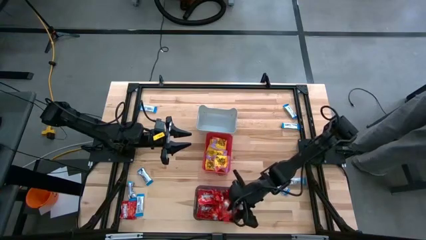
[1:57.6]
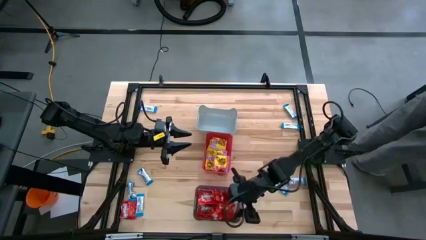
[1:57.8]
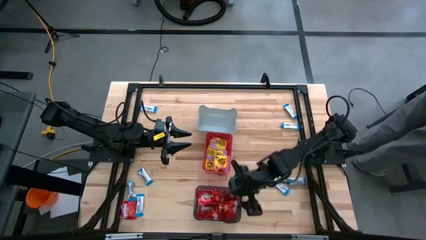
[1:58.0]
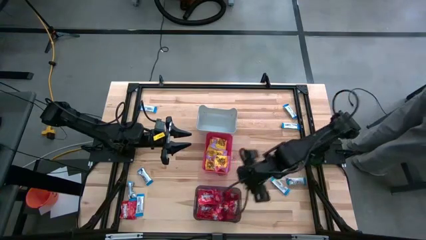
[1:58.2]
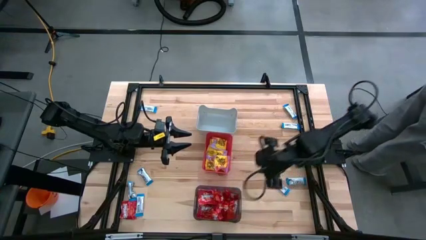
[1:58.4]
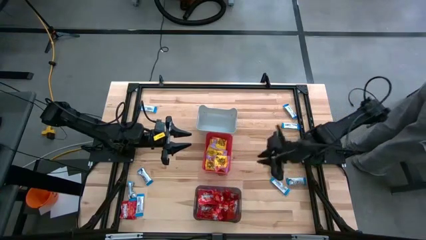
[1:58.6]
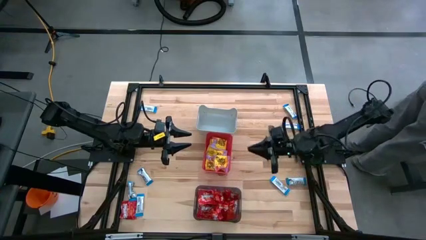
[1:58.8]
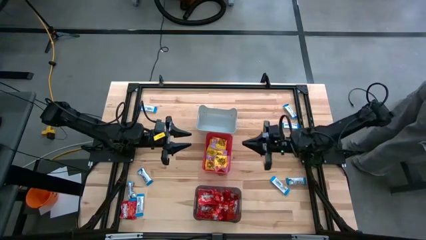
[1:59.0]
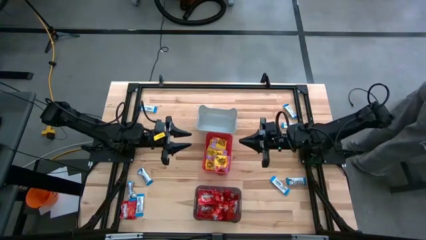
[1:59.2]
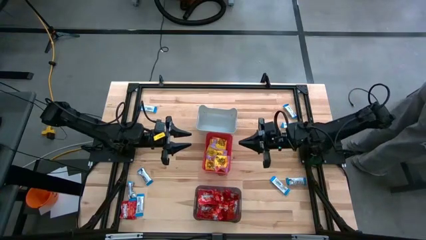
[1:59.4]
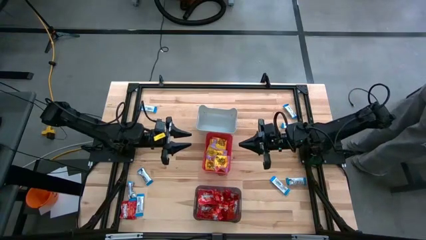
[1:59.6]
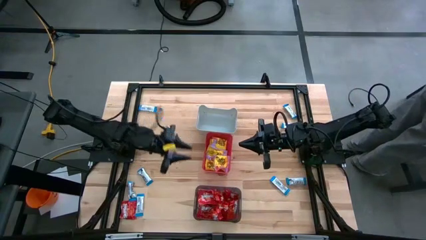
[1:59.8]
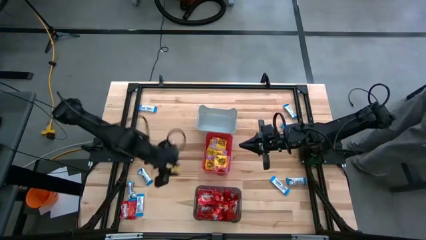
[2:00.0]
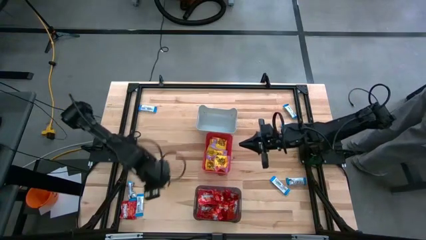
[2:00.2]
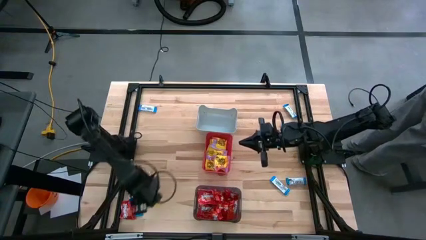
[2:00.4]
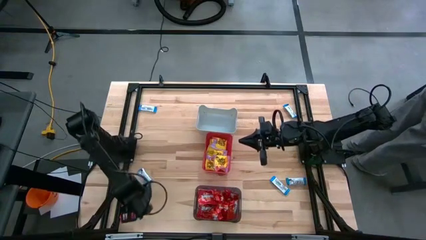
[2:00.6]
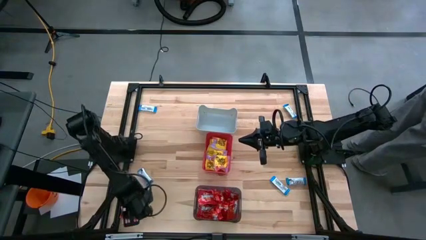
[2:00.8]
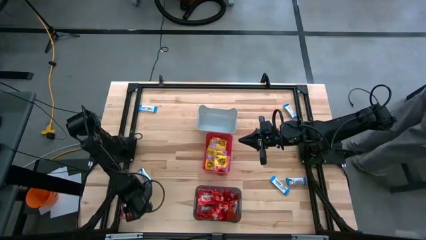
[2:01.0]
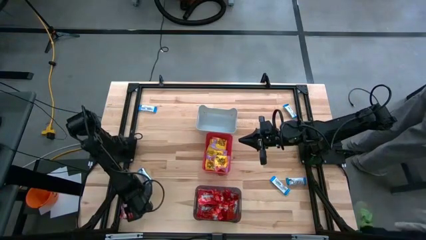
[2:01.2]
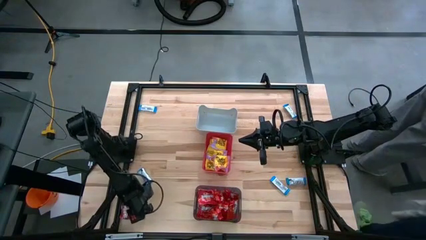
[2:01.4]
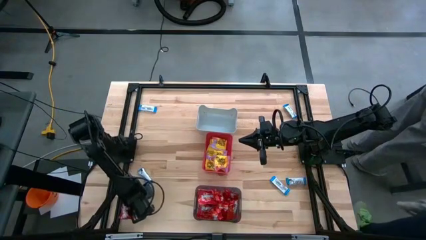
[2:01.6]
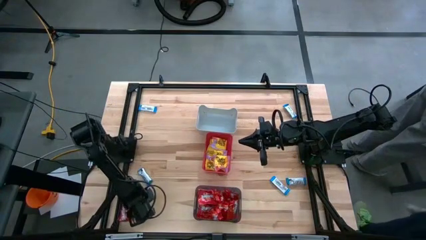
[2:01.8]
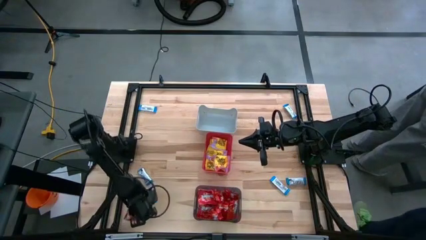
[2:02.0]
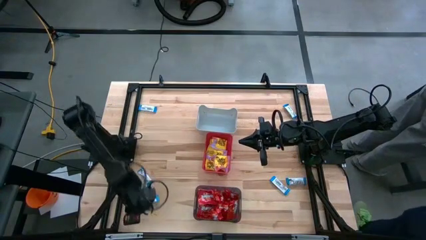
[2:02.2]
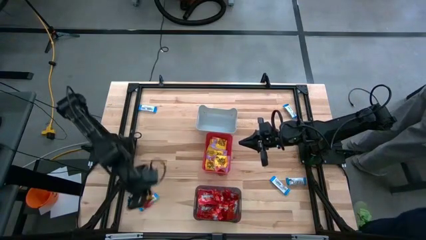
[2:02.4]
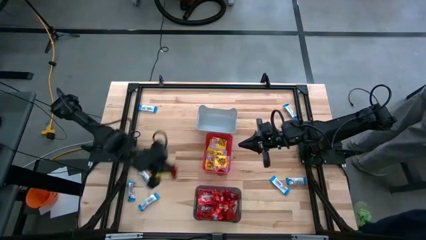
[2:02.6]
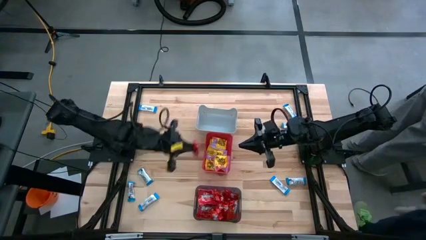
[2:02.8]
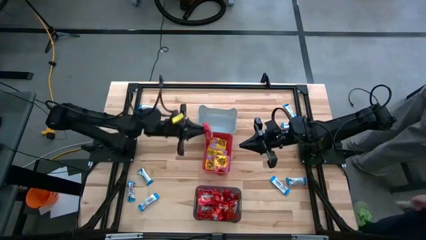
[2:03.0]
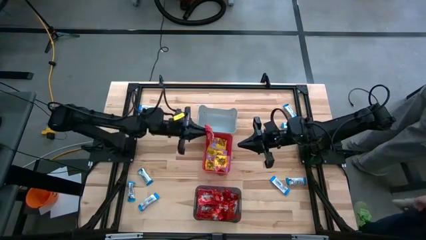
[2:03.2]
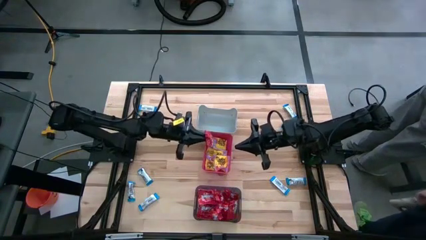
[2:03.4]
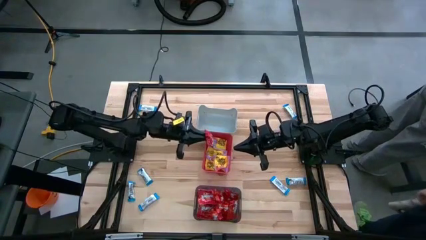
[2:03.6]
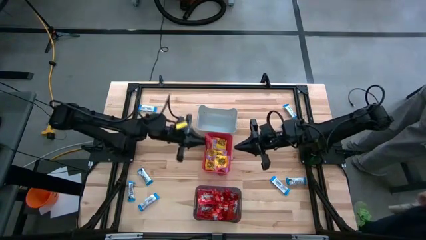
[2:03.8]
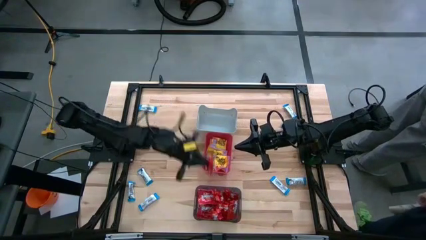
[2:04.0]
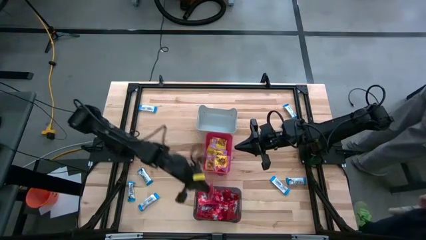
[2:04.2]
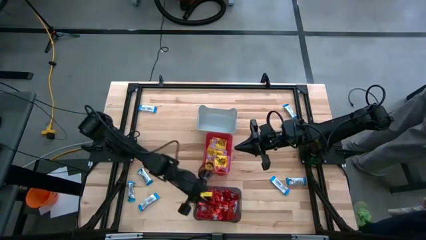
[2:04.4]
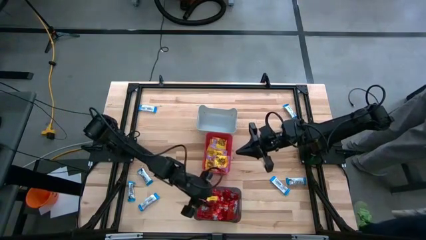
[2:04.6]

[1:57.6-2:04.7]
Task: Sort candy
Put the red candy into the black bin

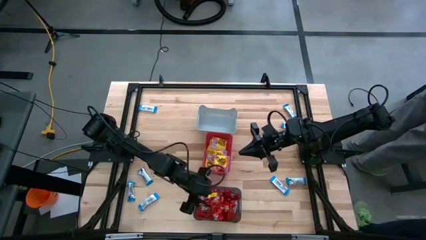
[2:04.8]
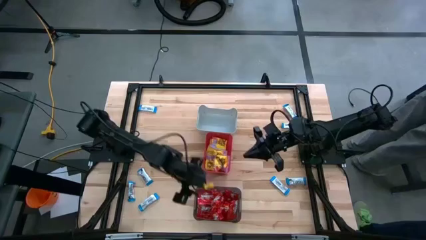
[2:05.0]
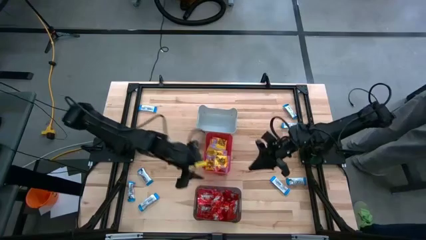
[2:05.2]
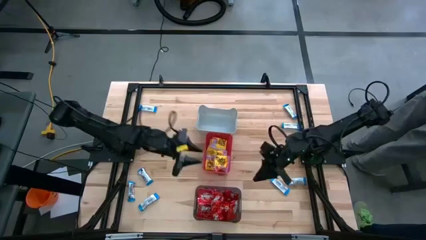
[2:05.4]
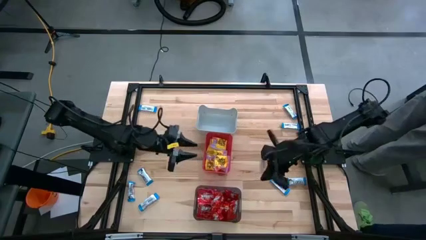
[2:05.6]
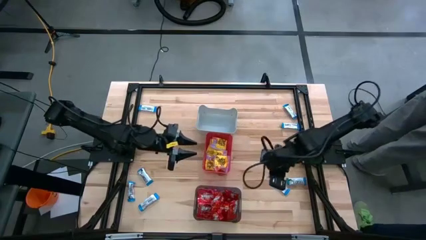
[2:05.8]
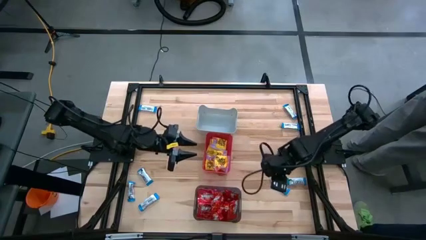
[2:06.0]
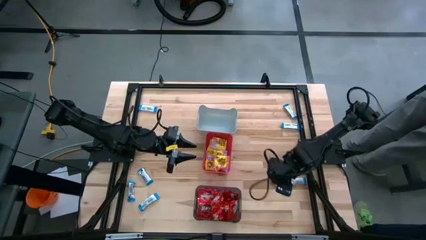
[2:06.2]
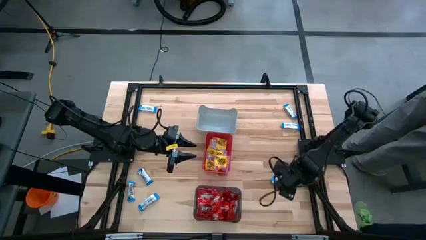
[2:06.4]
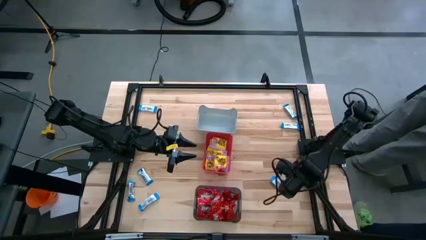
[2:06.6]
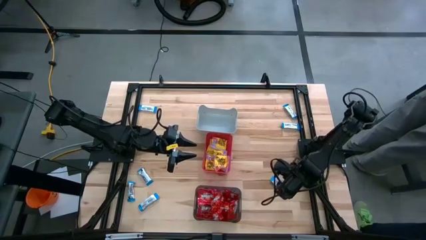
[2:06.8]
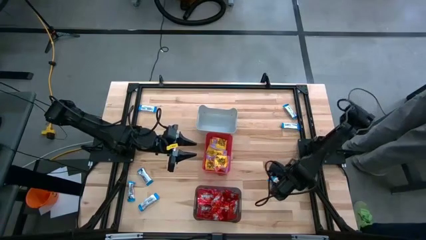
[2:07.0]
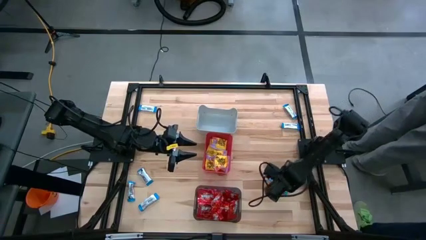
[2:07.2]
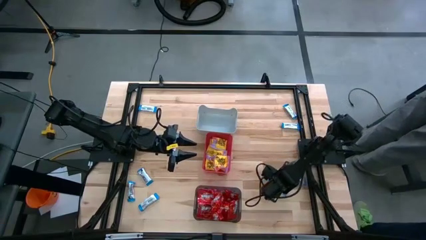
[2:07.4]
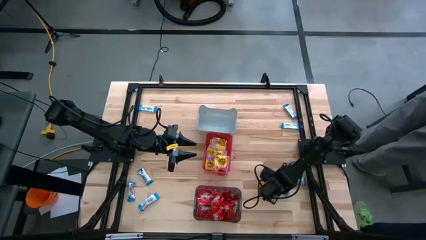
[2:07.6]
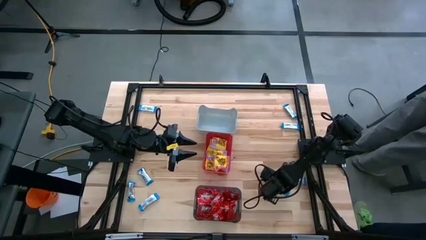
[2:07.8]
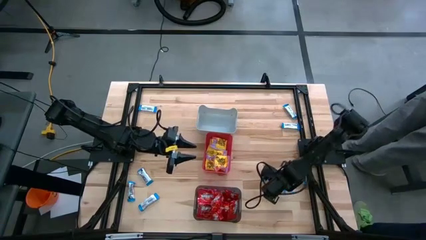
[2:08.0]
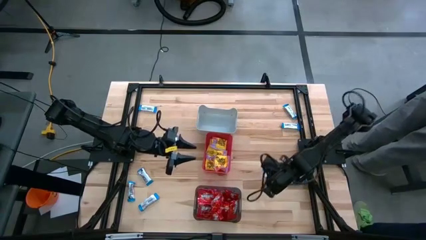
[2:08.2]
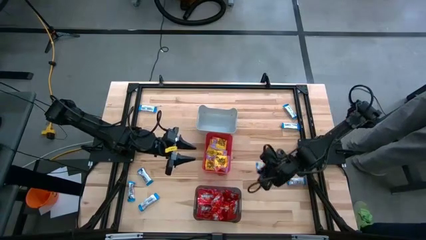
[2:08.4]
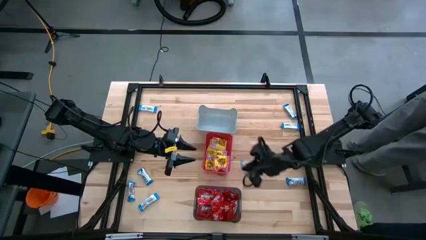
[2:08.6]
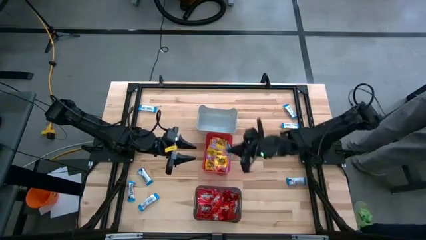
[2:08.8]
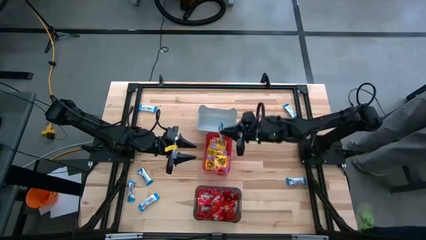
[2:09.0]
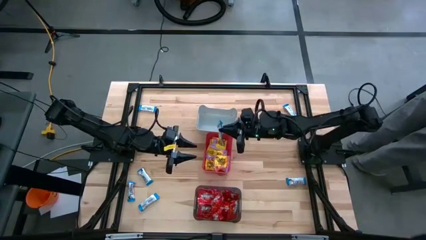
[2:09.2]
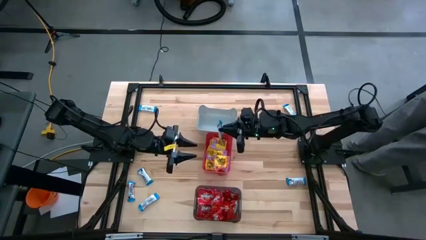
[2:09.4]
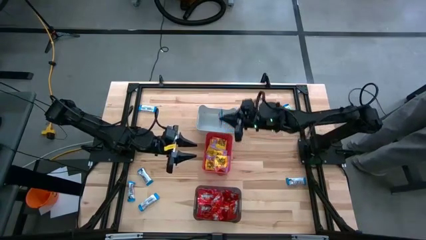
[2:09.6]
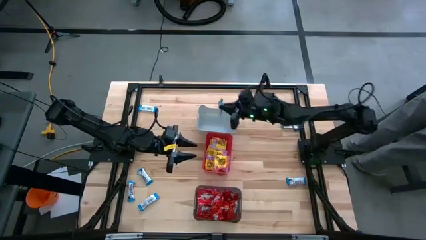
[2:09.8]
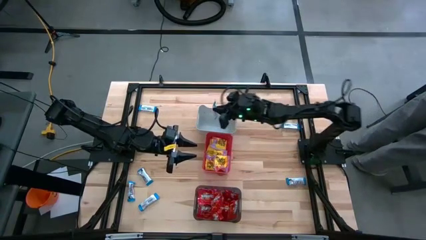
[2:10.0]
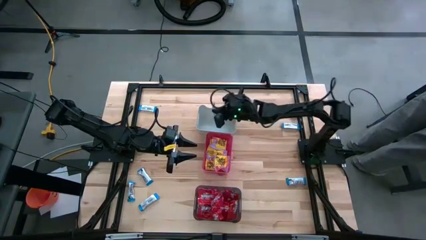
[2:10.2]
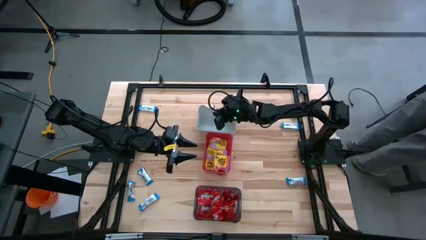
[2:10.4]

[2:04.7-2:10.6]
Put the white candy into the white bin

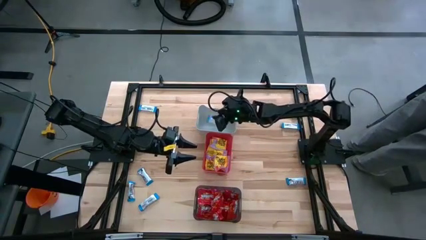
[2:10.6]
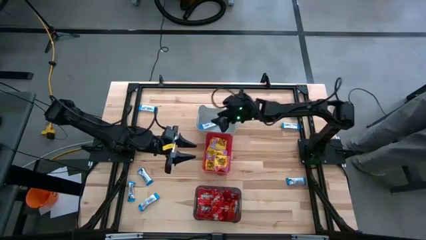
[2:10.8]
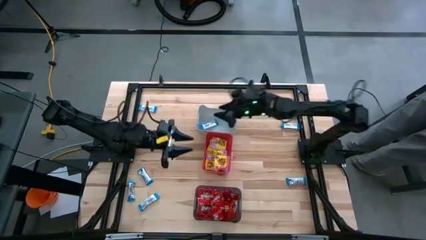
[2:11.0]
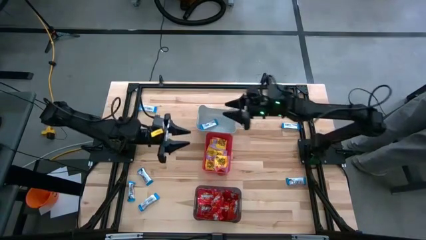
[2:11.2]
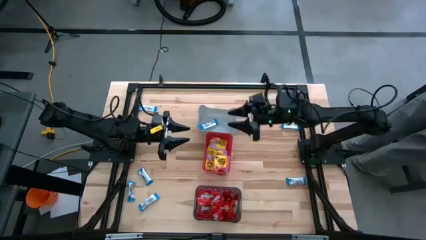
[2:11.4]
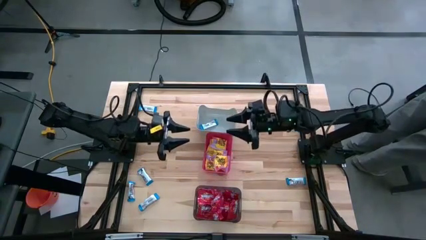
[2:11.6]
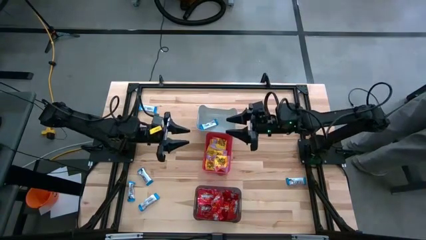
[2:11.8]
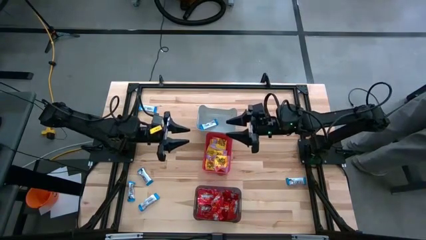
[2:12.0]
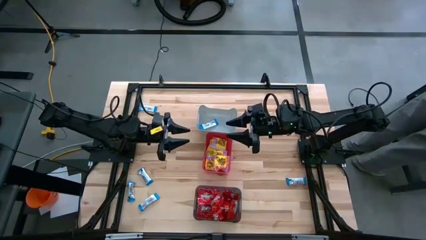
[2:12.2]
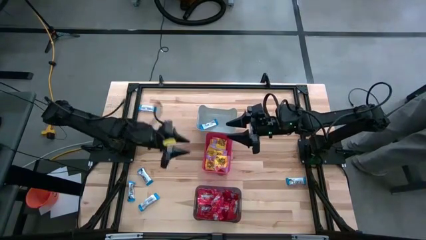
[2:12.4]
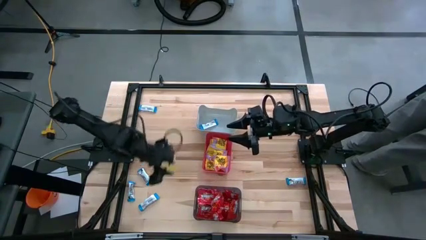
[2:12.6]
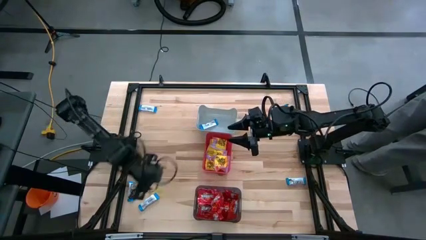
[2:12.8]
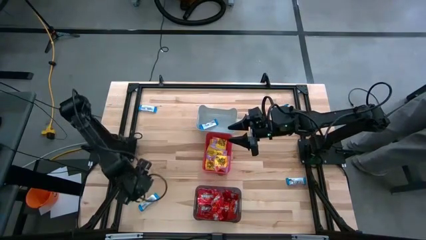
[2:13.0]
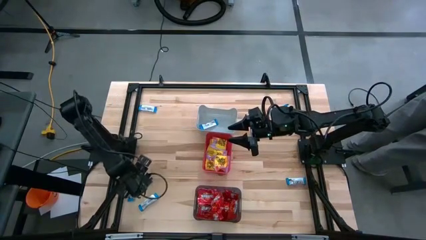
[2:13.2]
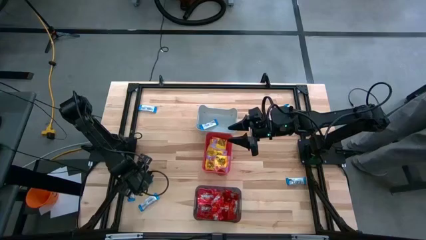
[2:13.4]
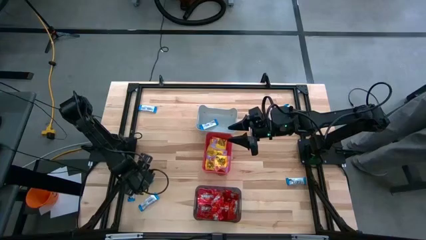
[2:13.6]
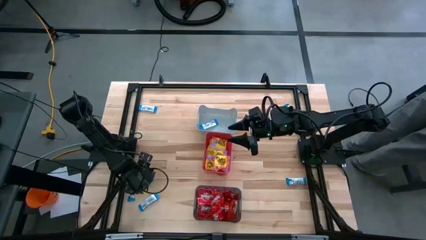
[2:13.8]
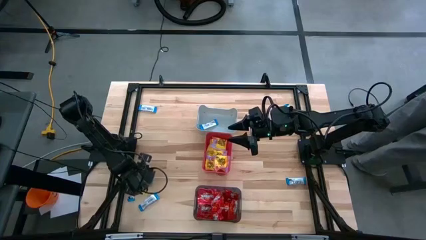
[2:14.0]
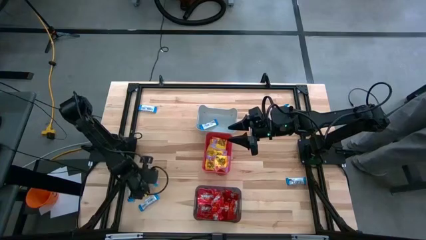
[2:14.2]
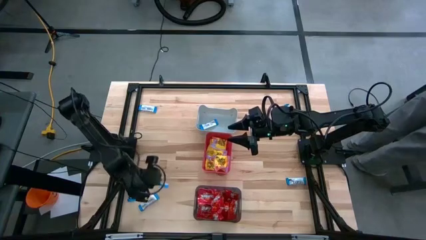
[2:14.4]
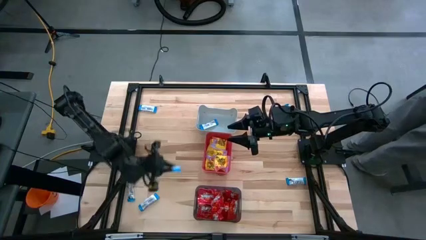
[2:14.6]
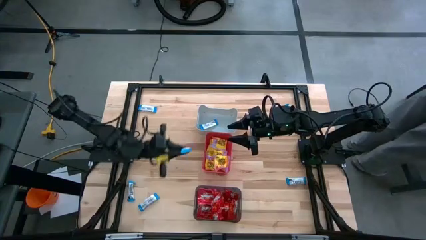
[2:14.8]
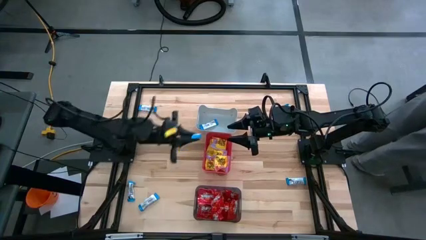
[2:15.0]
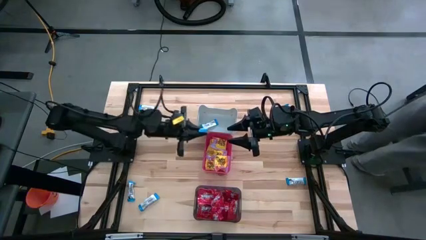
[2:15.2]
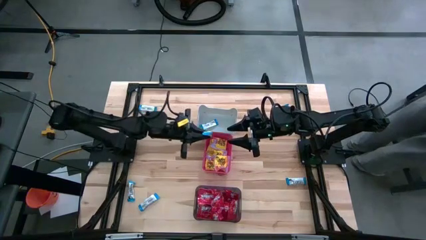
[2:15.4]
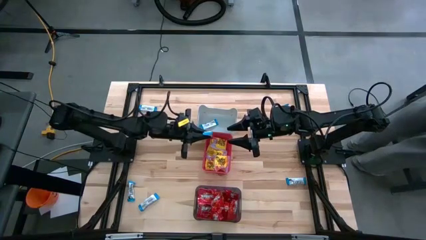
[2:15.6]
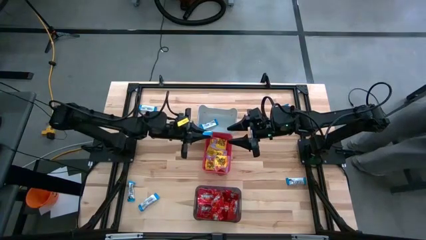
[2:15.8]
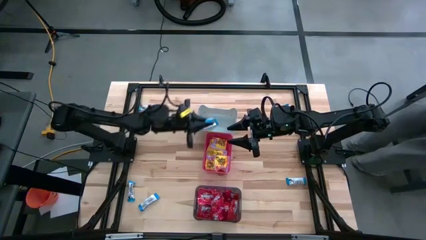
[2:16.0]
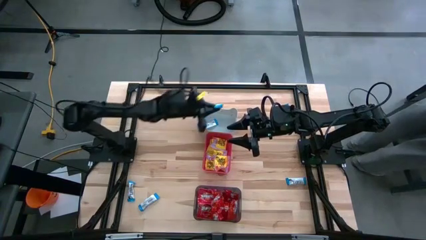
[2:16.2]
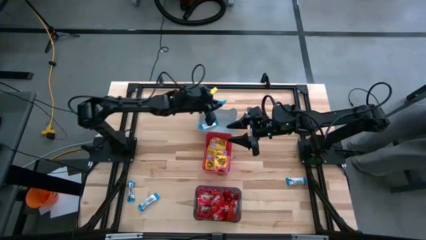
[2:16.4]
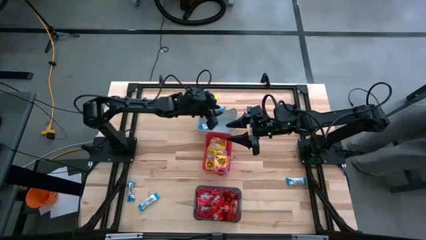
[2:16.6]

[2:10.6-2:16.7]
Put the white candy into the white bin
